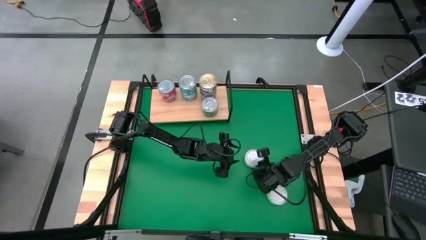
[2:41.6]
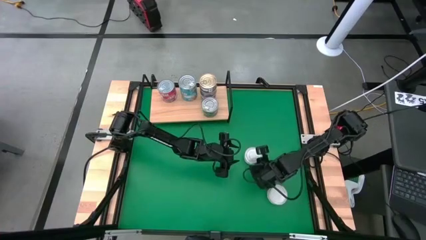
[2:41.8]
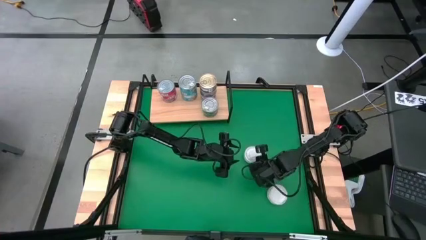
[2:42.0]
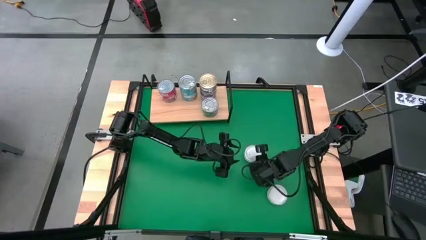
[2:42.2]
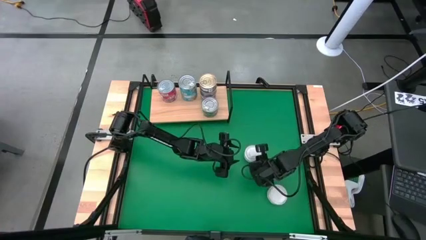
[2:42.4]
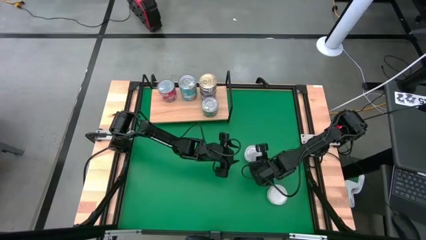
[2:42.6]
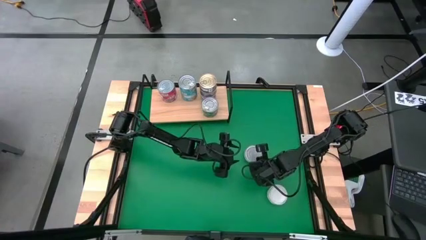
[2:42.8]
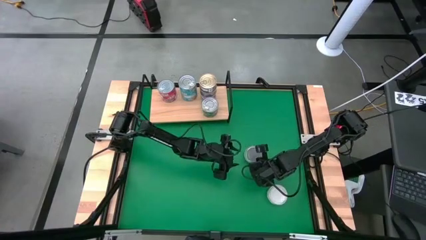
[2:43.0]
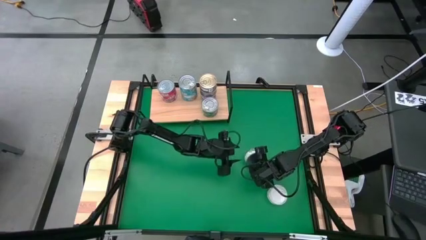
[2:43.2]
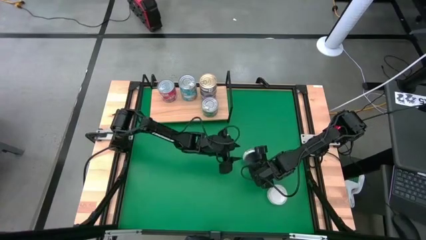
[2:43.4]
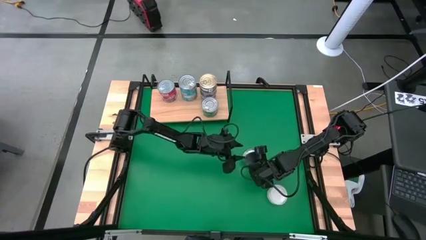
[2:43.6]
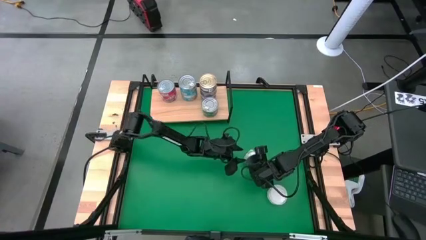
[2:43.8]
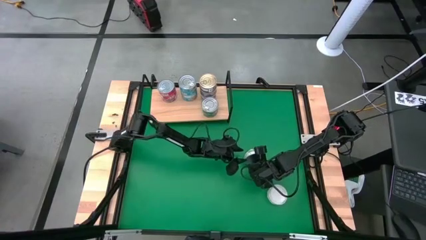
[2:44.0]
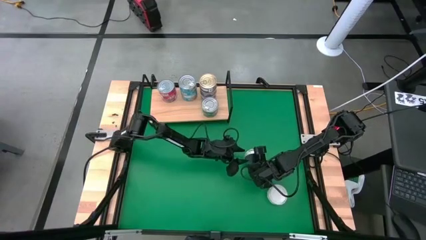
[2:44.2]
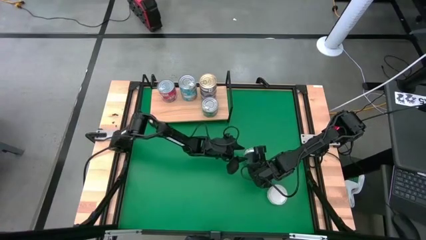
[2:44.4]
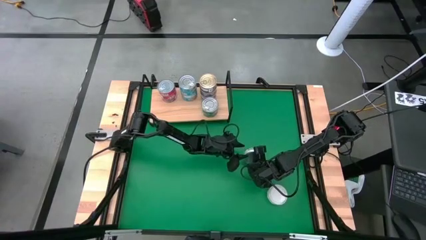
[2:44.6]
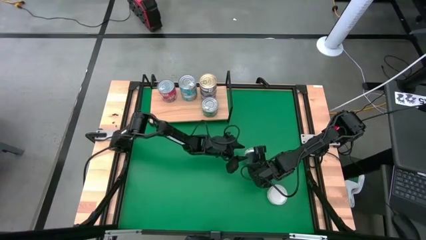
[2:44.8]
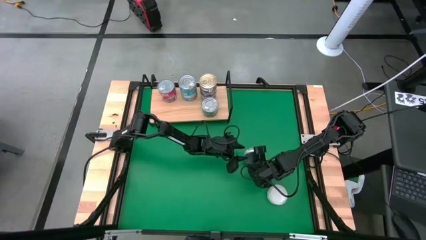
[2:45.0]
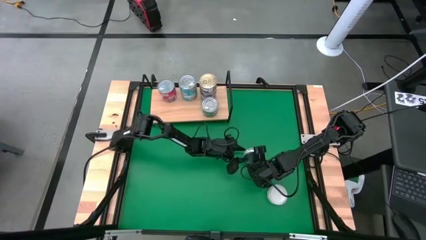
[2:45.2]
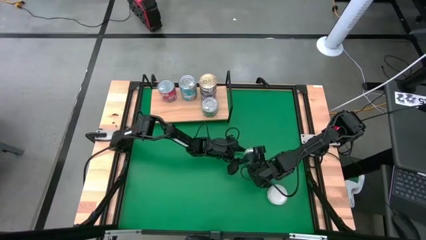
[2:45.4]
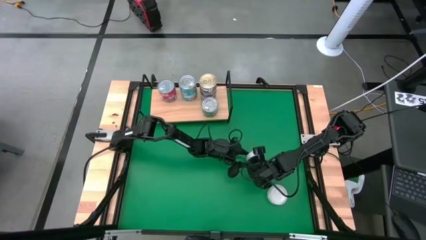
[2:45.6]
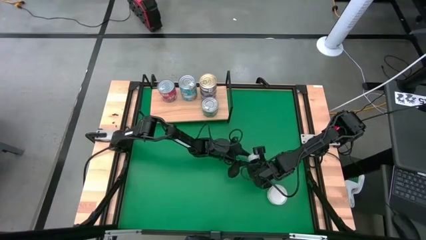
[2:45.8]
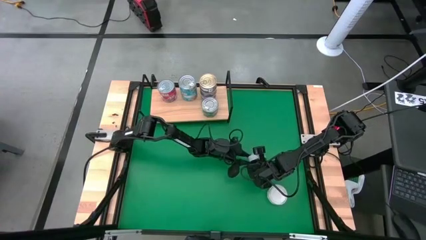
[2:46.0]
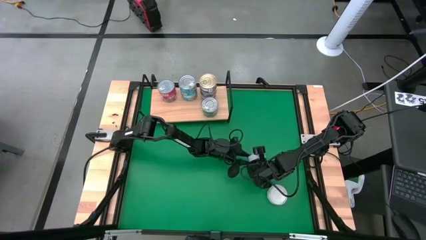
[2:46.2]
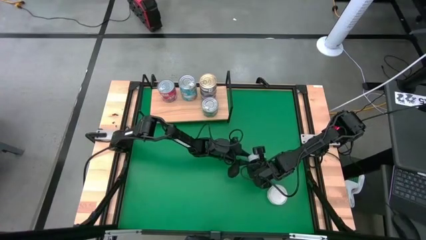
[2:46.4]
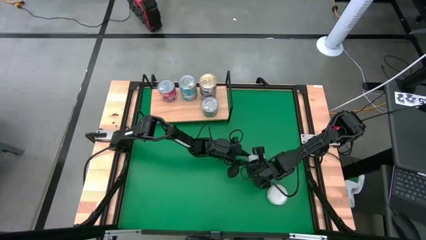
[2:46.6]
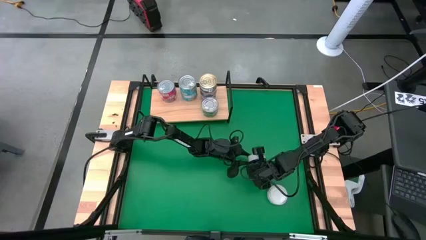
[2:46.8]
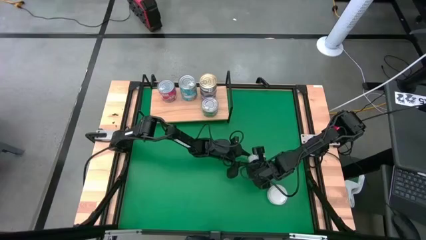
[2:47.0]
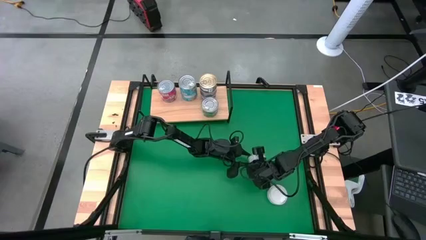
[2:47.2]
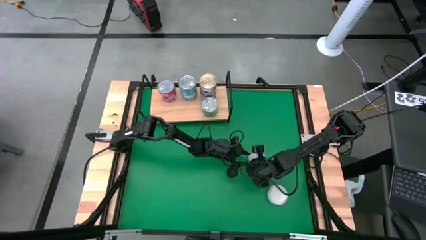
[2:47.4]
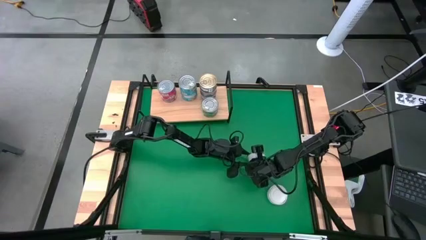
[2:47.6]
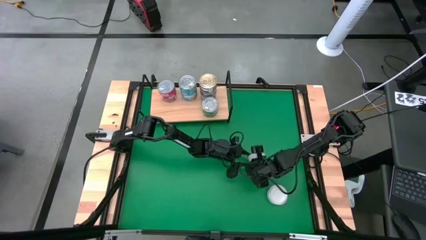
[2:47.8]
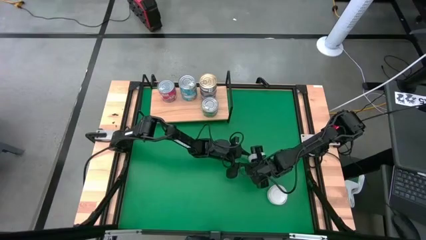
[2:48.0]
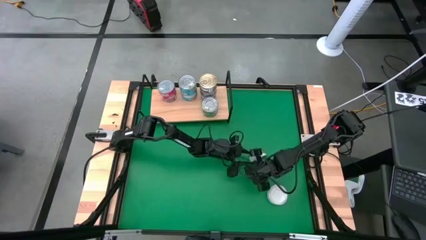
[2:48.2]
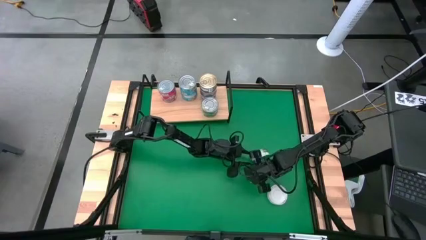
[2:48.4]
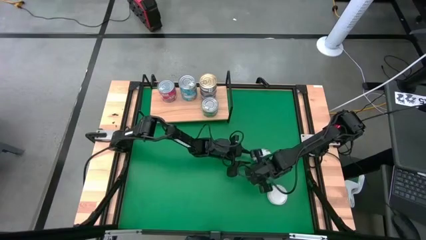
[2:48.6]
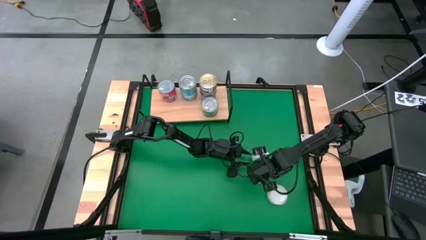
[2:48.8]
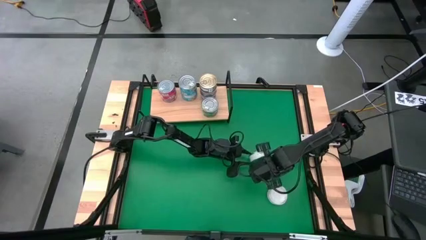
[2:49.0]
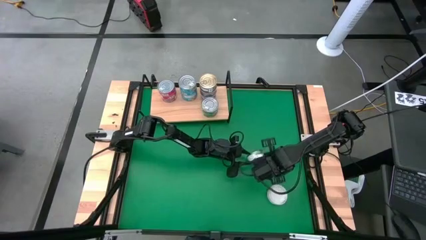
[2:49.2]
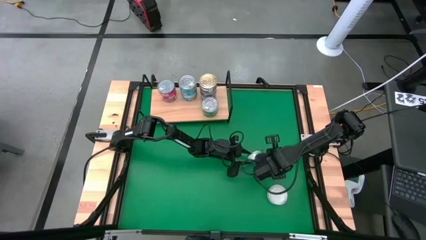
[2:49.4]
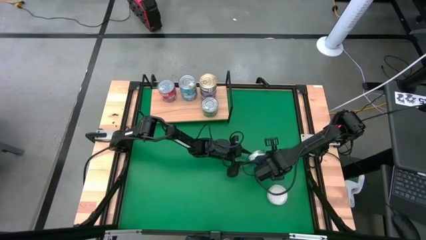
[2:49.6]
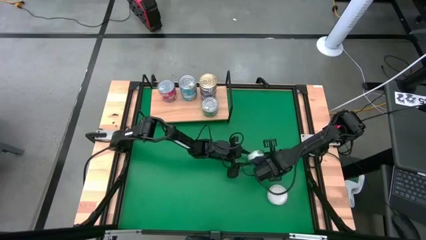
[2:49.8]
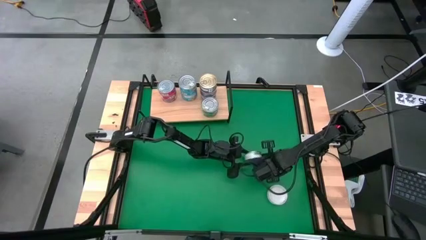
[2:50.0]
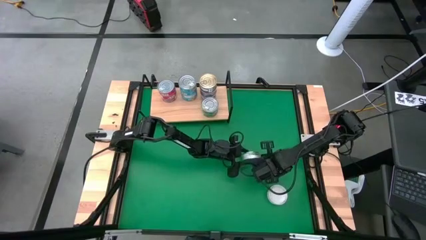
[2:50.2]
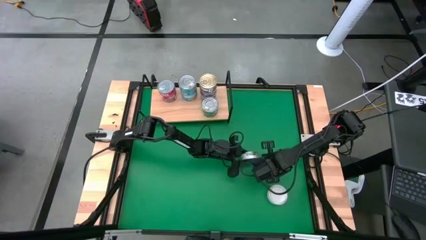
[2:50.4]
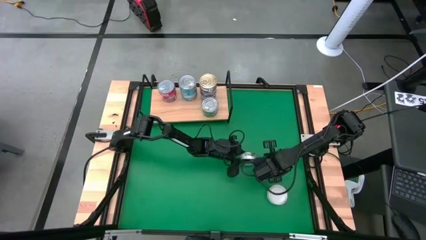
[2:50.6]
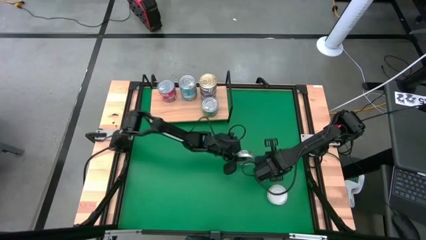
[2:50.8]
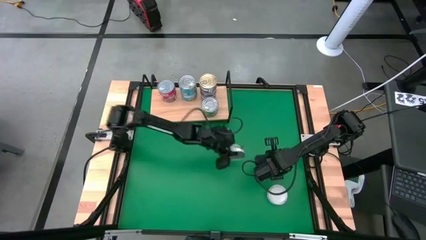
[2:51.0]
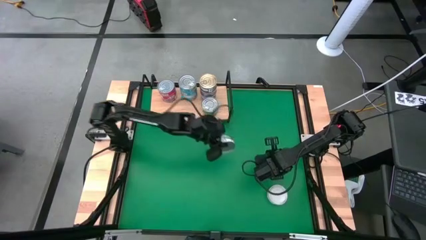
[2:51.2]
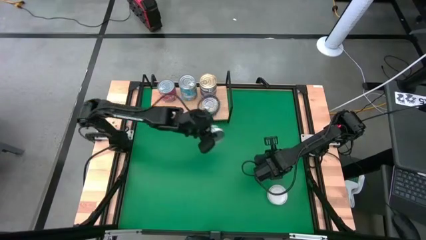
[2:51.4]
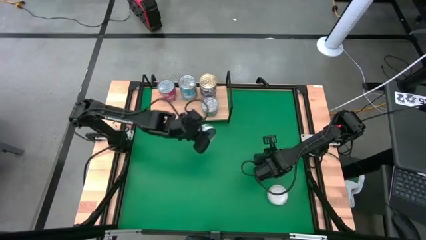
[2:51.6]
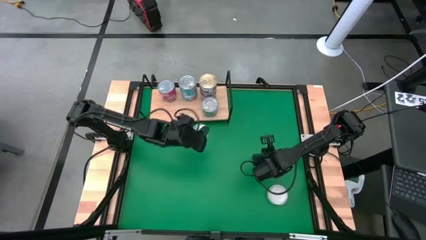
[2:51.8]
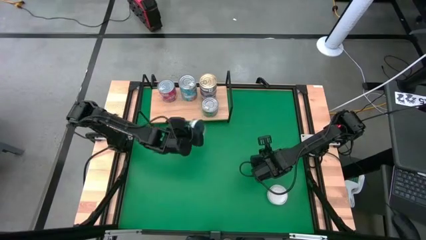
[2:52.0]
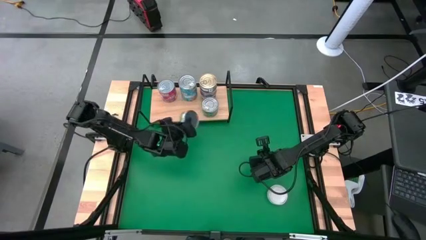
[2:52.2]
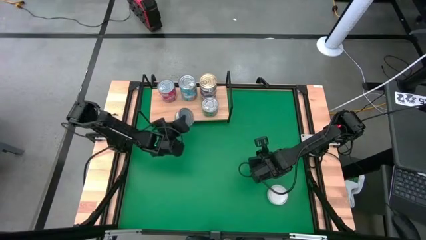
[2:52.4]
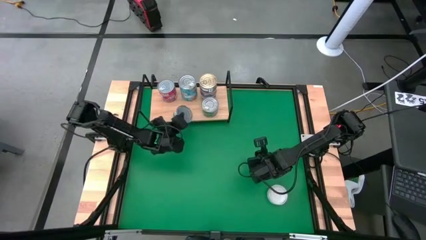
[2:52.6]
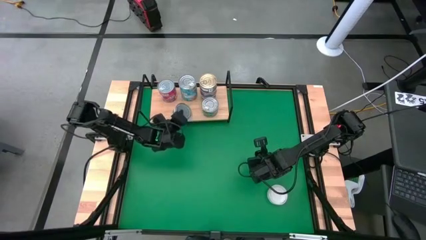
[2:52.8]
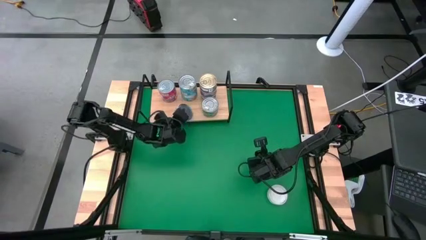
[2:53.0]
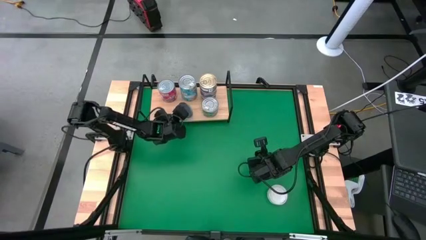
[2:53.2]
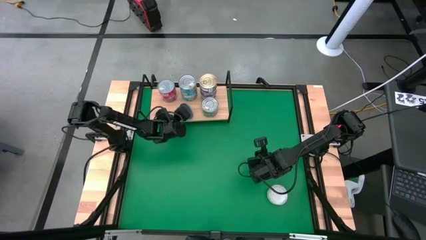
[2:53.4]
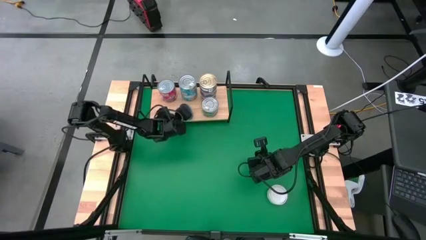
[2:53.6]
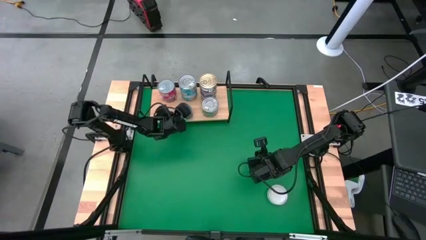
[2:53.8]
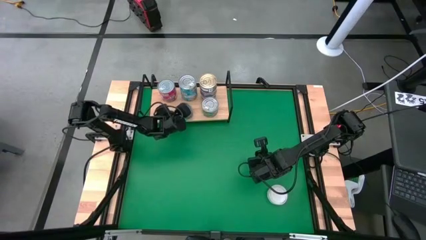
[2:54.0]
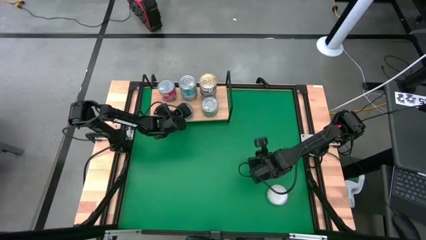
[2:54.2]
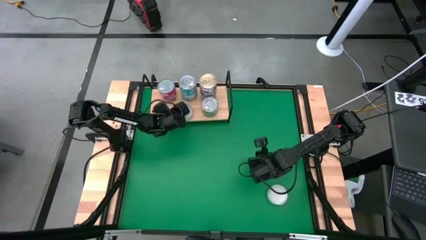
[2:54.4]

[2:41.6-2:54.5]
Task: Stack canned seafood by type on shelf
Put the green white tuna can on the shelf

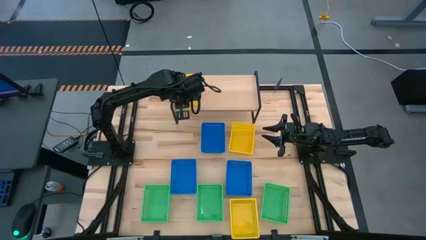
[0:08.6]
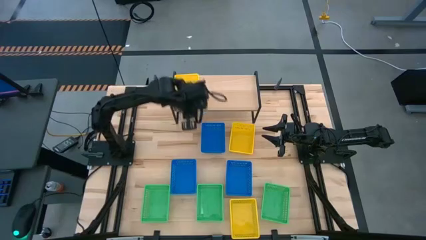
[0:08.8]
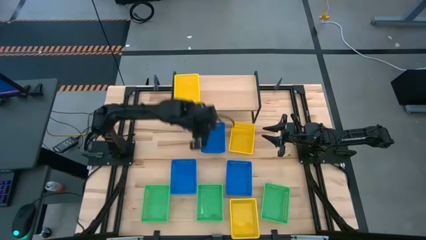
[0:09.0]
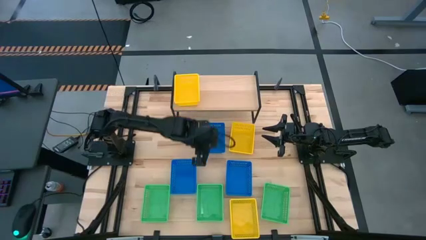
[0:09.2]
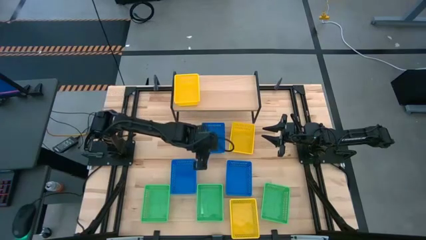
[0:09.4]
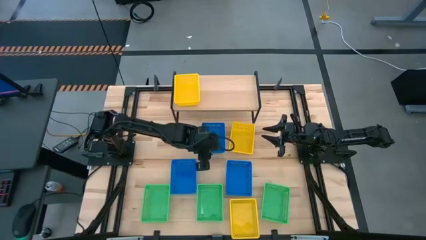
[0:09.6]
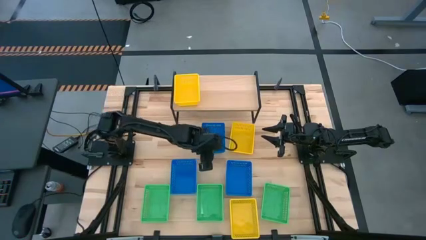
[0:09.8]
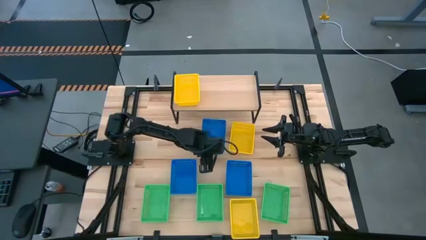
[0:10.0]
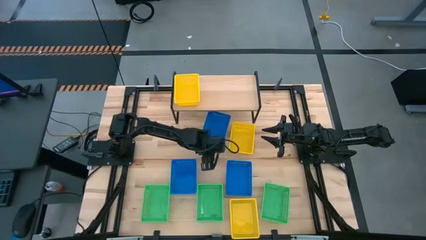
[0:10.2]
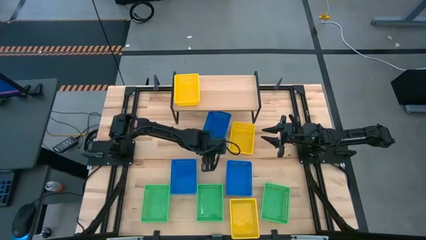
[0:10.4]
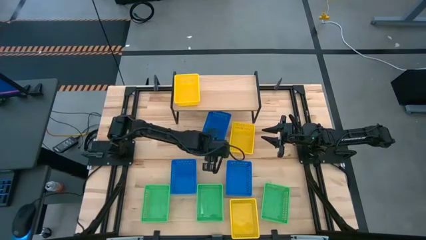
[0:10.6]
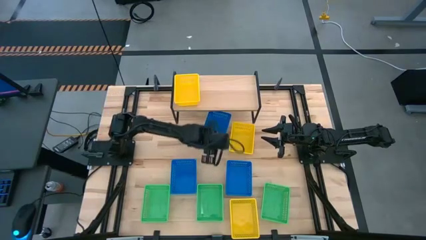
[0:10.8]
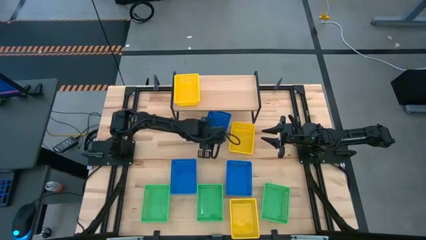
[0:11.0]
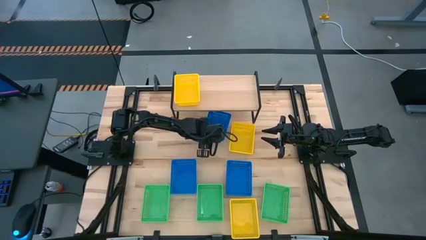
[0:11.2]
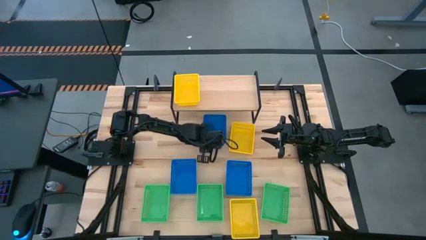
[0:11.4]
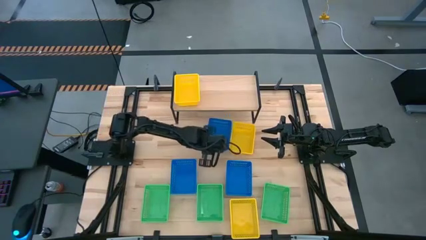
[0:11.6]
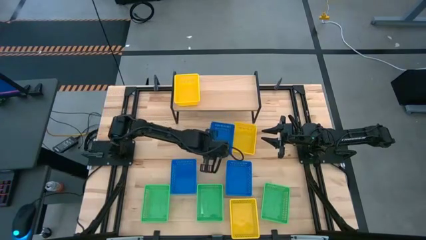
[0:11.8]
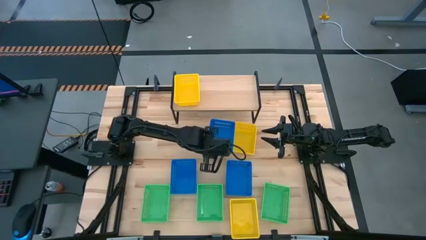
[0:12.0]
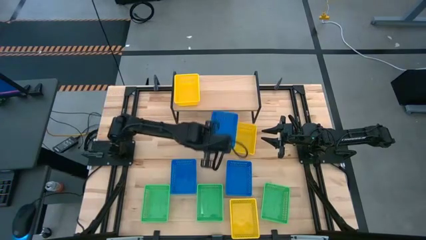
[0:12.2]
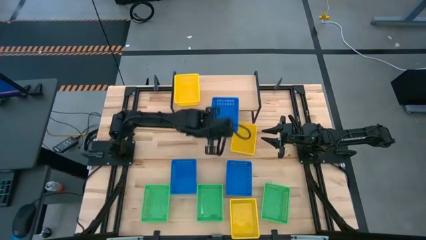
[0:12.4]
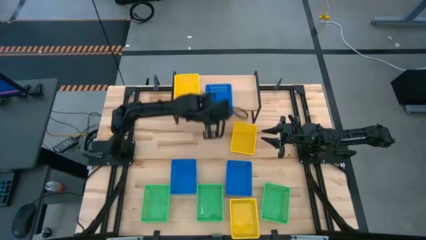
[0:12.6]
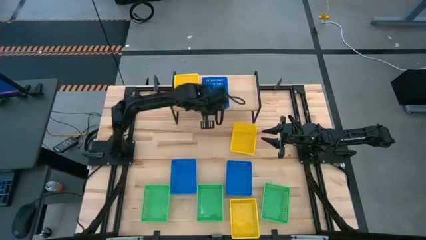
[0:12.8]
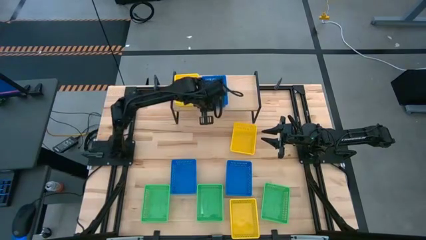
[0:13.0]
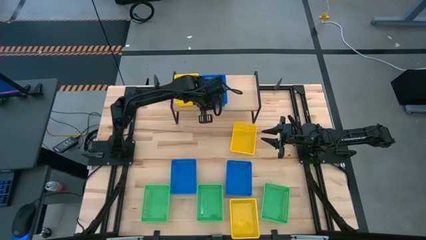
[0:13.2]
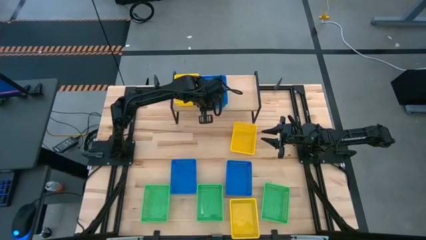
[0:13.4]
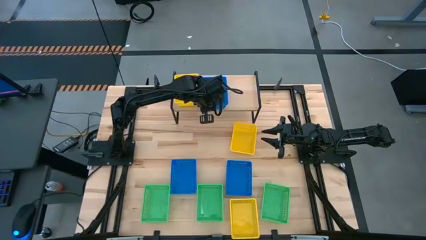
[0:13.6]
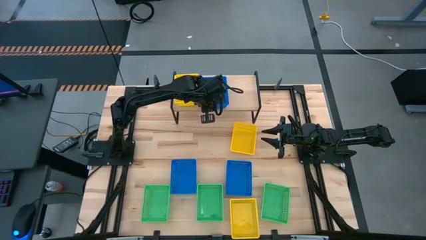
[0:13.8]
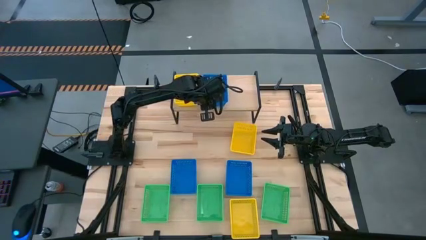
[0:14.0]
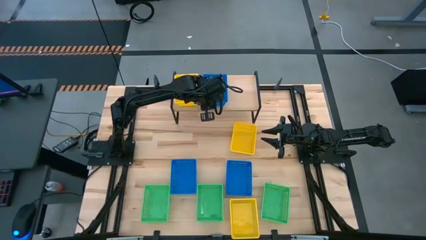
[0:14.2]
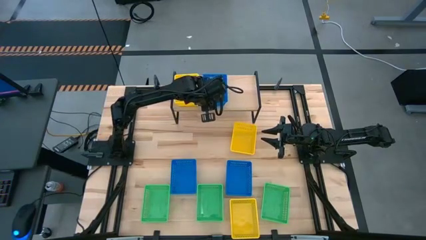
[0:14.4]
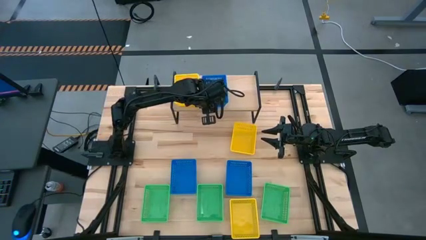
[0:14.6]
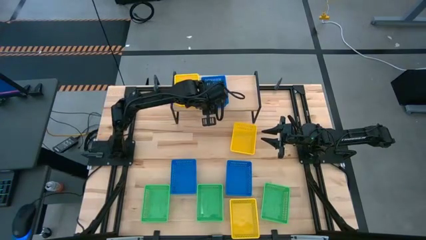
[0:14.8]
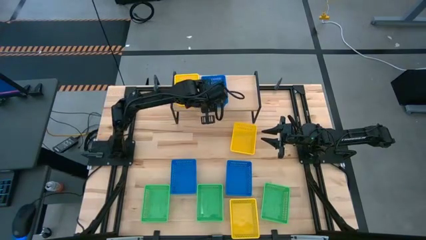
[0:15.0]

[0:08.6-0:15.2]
Task: Stack baskets on shelf by color
Put the top blue basket on the shelf
